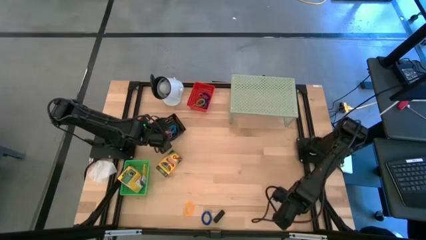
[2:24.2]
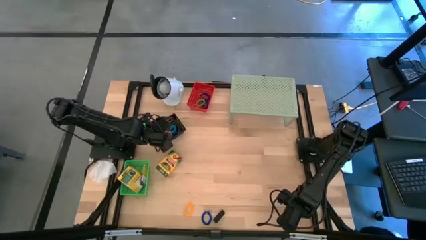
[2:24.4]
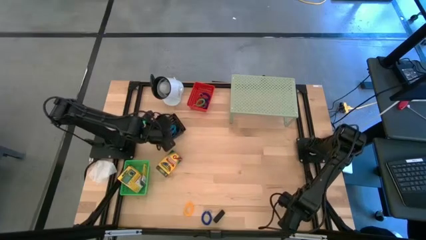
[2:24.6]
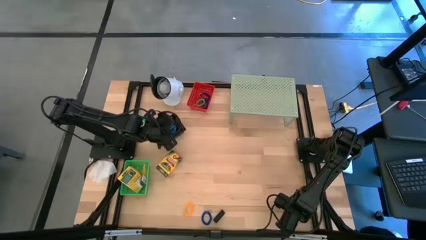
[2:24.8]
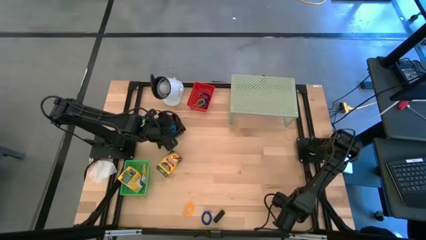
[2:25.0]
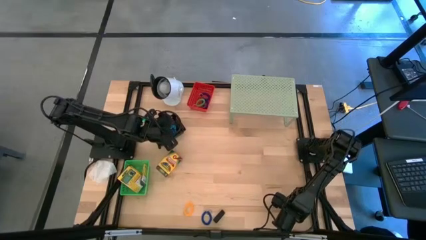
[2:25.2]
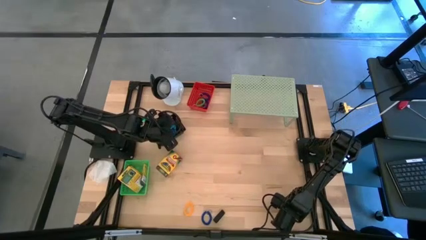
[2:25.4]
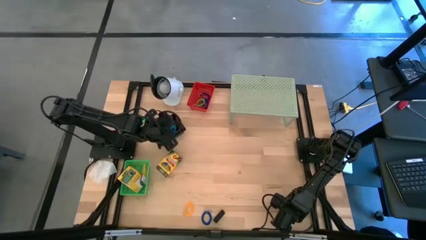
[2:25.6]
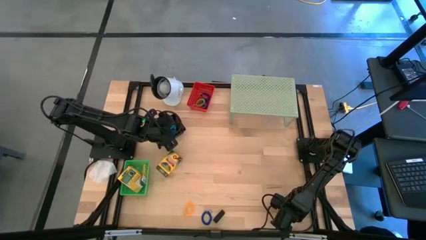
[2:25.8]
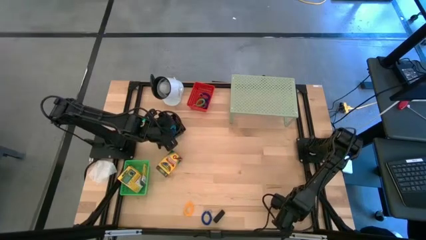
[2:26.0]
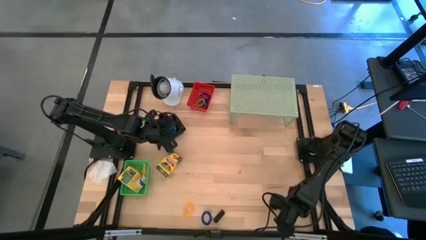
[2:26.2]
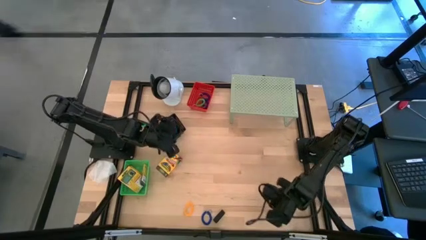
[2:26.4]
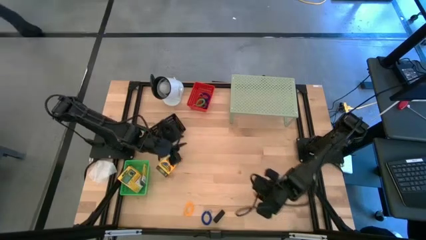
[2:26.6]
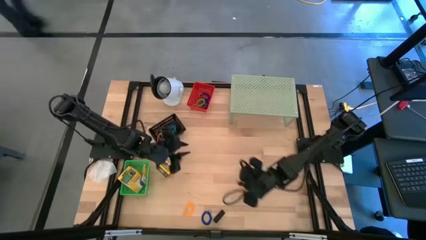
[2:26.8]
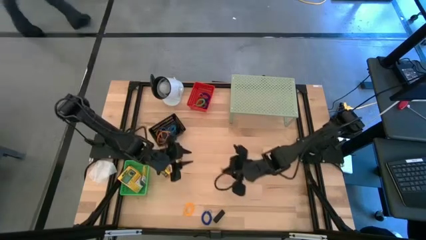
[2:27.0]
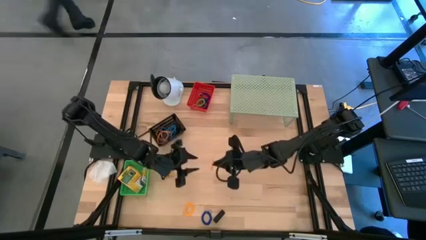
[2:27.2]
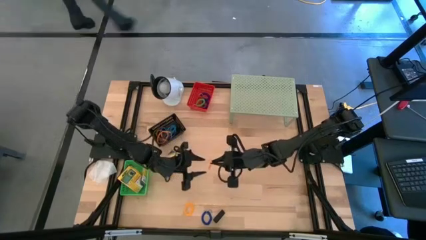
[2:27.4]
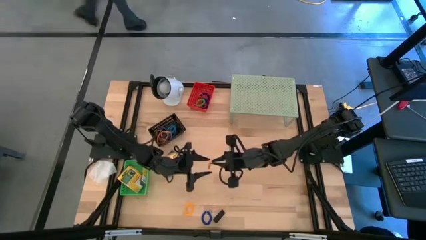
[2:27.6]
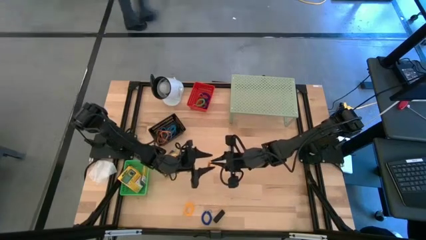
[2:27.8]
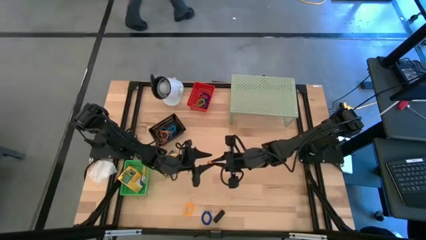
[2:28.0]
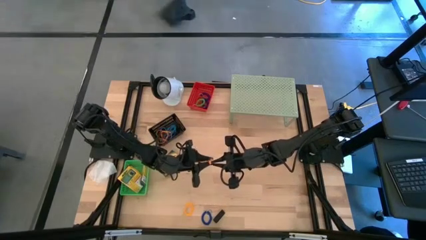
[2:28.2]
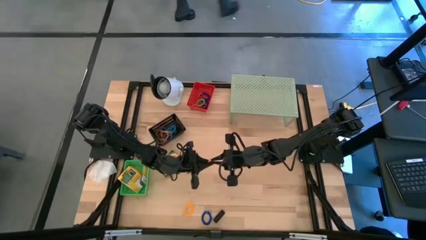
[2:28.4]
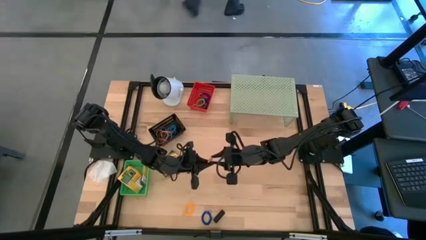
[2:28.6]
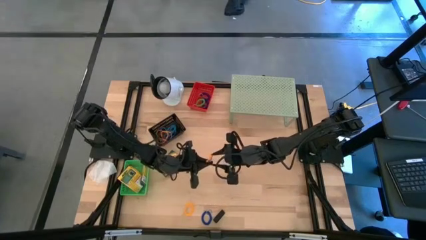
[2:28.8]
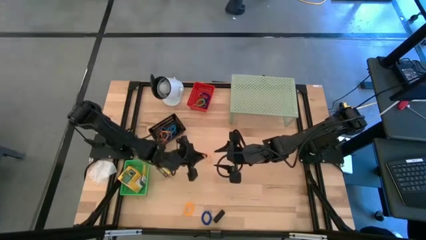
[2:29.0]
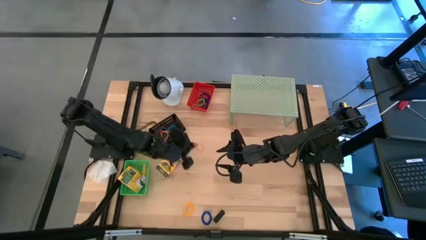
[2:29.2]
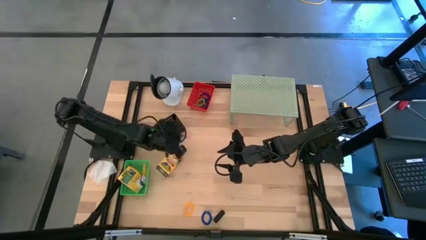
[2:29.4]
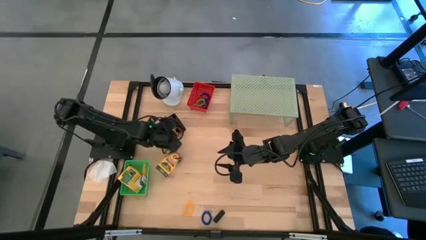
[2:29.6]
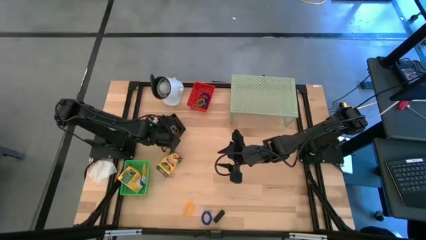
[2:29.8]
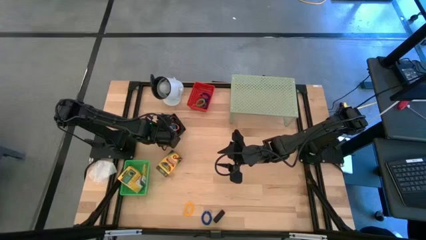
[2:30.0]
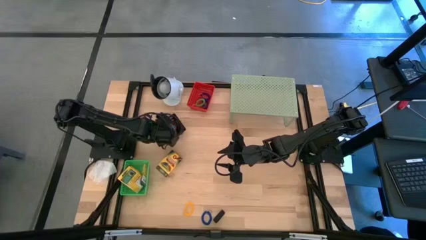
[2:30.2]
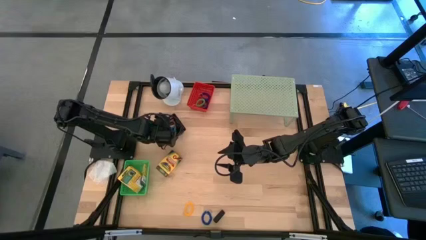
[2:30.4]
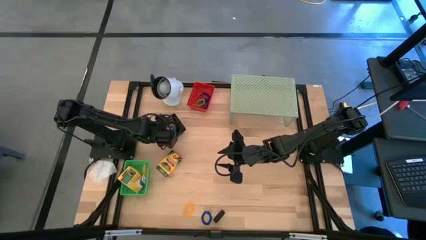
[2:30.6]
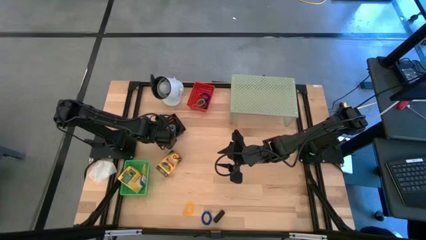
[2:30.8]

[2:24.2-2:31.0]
Task: Pick & Place Office Desk Supplies
Put the orange rubber band into the black bin

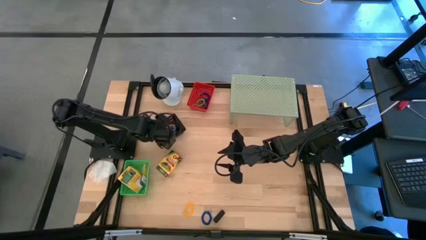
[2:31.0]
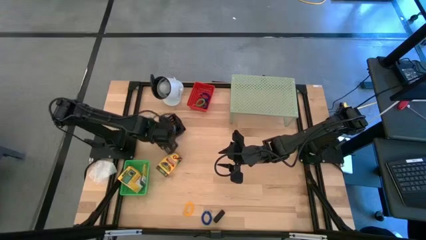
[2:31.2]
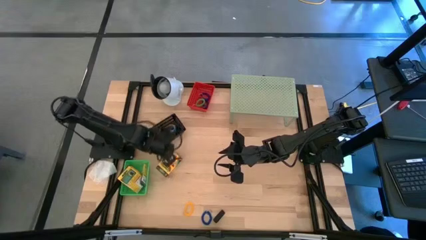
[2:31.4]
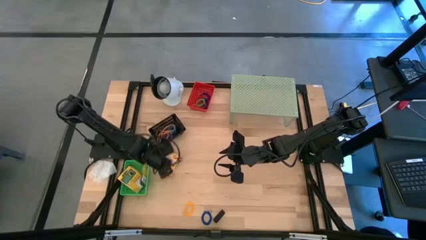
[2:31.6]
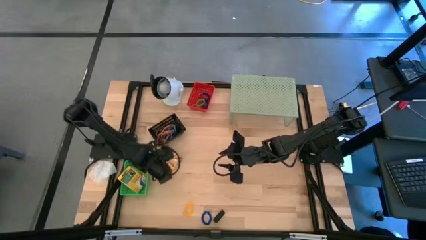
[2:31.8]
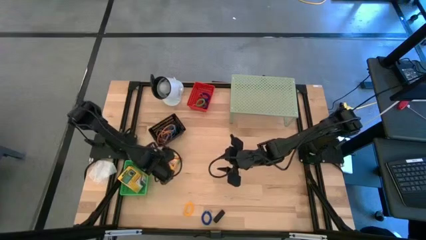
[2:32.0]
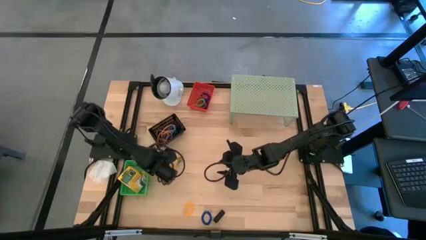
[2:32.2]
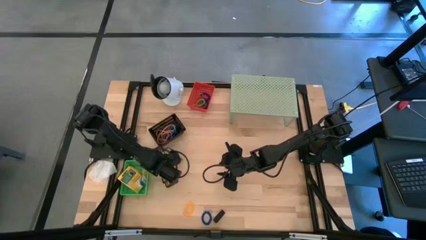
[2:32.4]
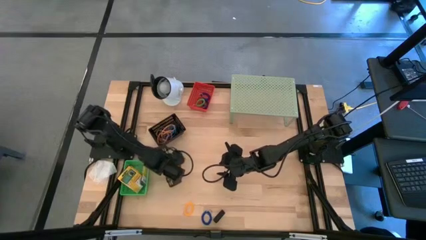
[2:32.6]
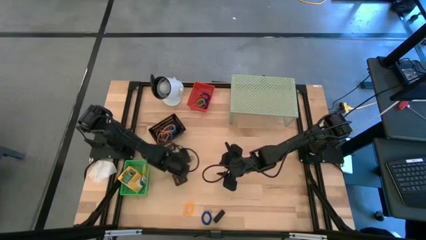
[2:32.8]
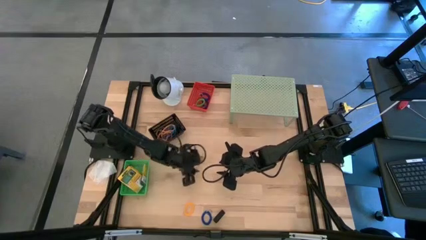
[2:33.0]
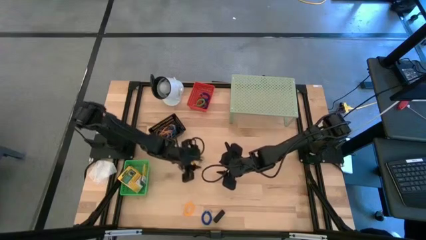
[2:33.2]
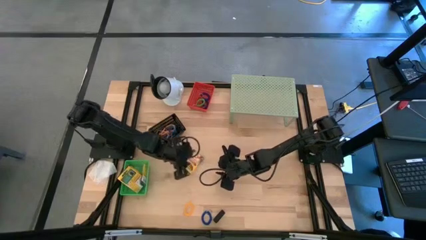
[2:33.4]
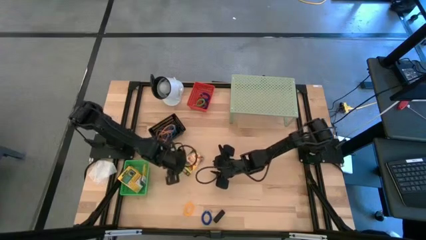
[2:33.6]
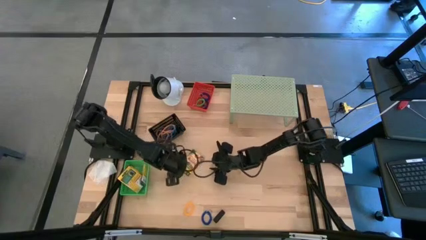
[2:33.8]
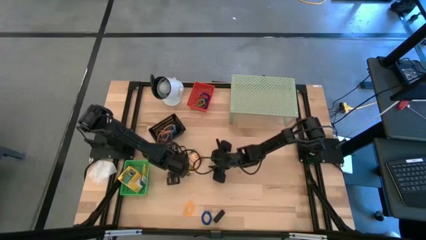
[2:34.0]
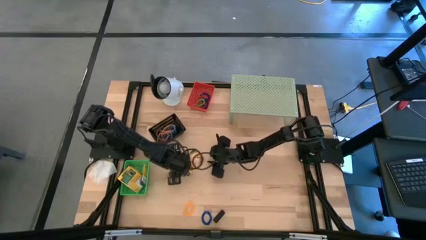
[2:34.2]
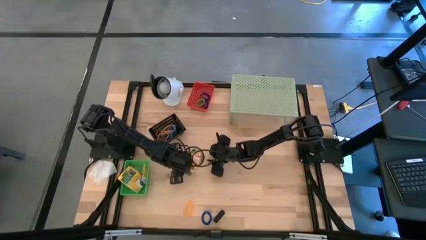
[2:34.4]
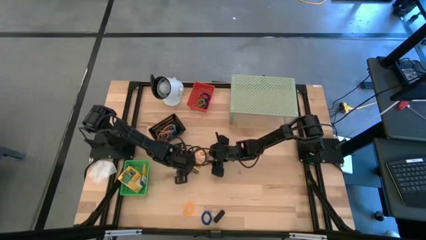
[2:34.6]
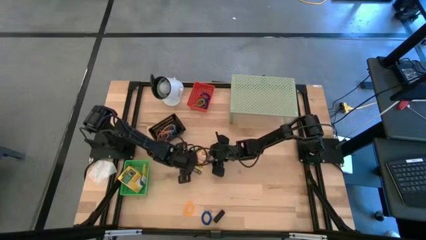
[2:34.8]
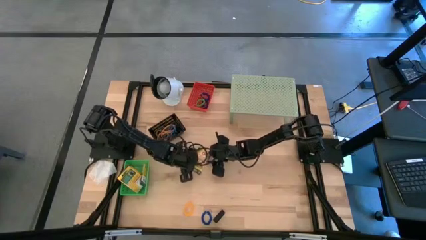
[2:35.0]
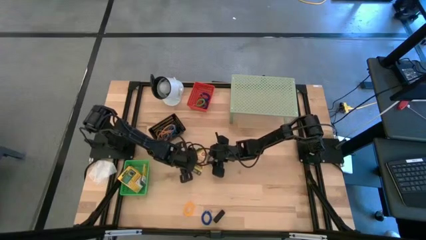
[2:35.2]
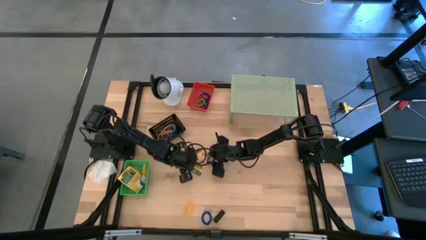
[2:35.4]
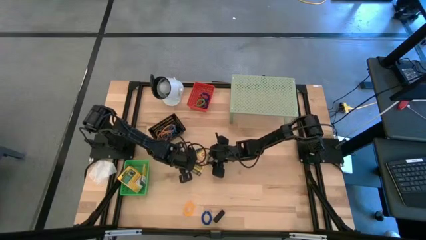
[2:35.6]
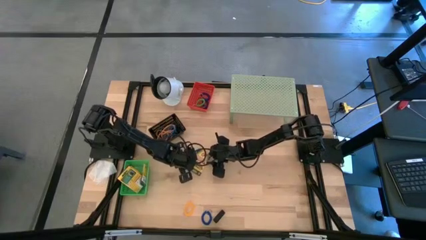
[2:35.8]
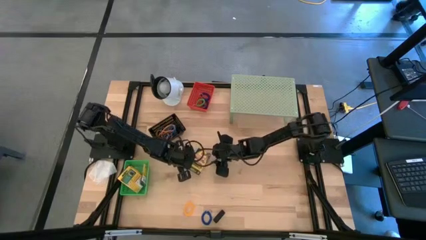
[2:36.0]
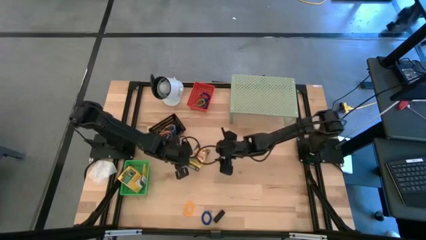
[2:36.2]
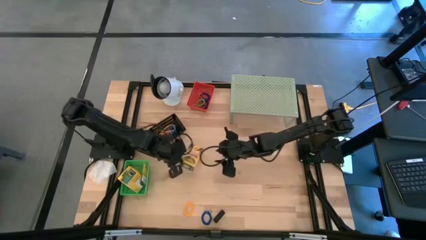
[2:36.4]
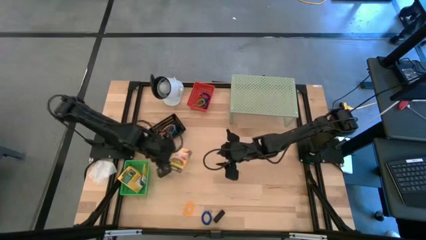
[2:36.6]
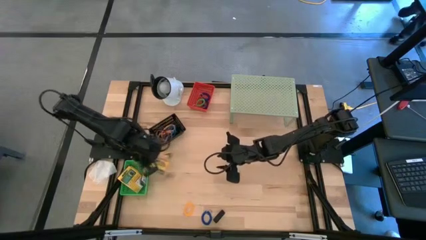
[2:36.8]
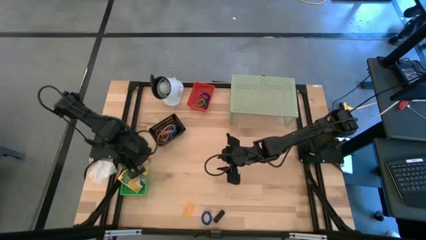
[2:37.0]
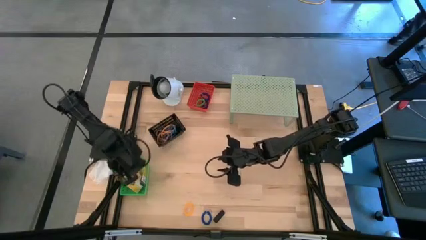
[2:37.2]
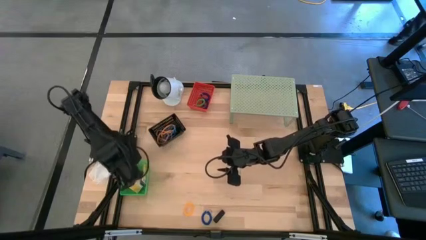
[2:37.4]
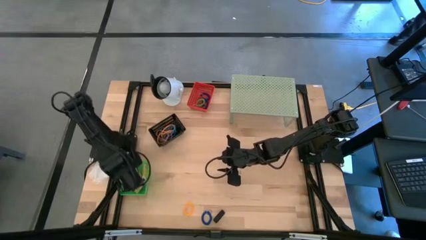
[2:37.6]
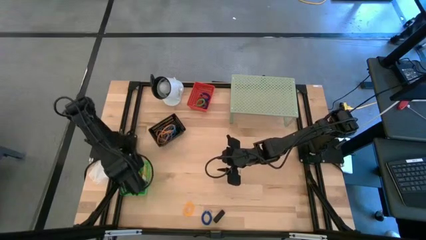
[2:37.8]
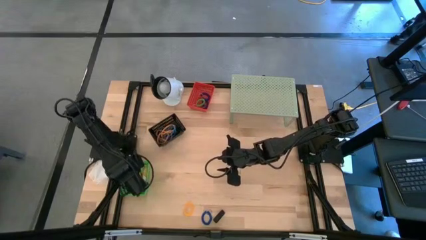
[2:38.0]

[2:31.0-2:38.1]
Put the crayons box into the green bin

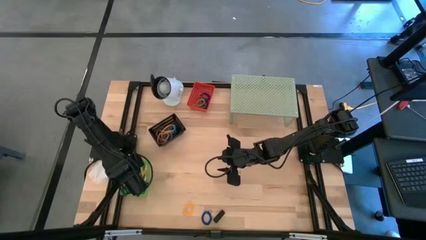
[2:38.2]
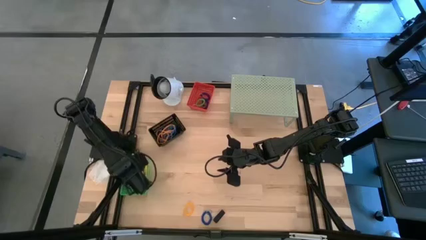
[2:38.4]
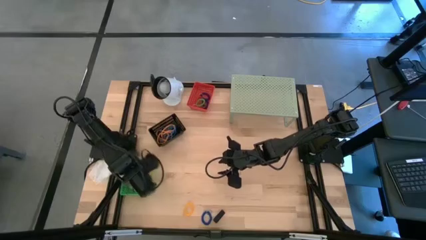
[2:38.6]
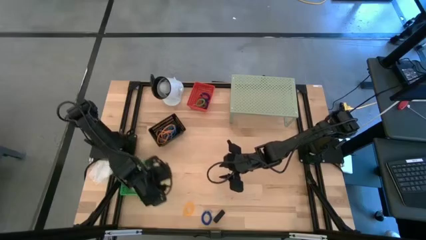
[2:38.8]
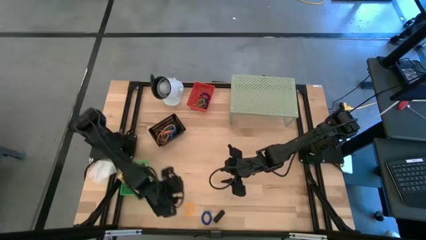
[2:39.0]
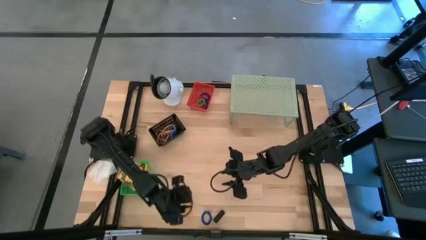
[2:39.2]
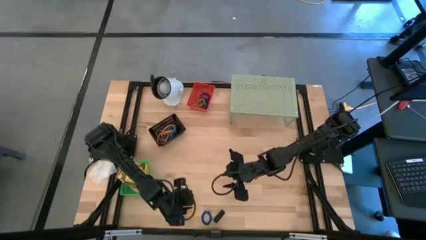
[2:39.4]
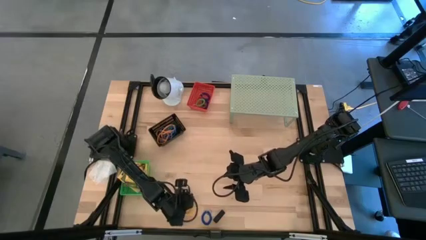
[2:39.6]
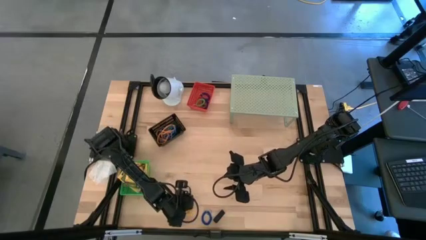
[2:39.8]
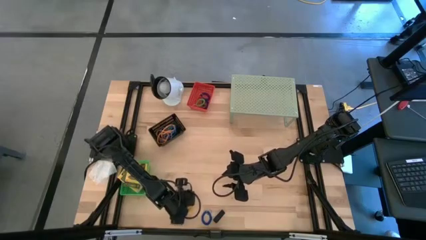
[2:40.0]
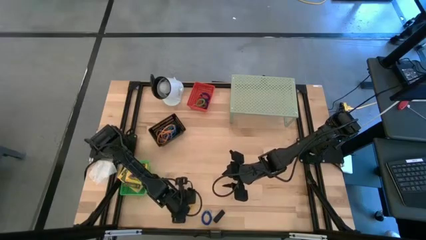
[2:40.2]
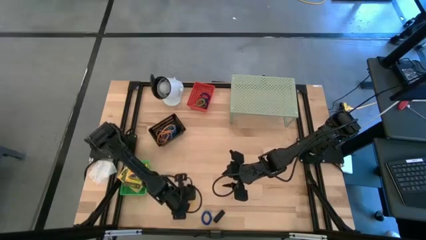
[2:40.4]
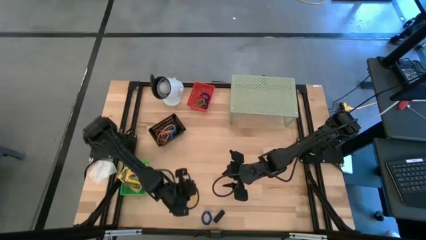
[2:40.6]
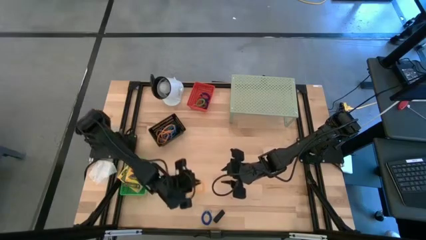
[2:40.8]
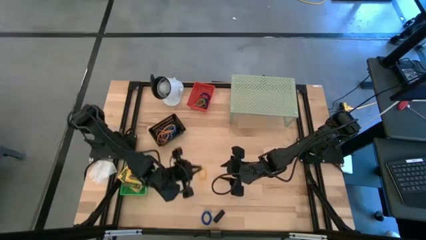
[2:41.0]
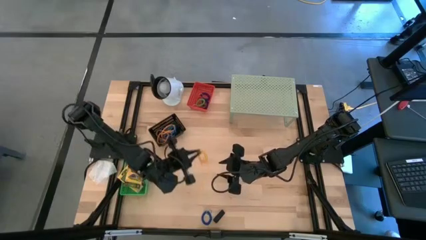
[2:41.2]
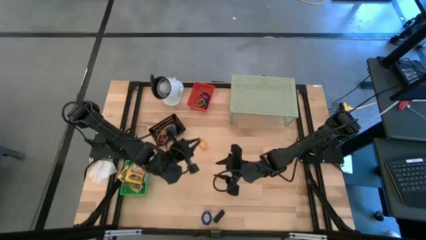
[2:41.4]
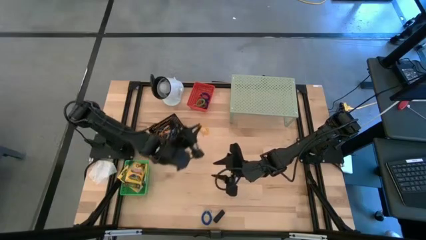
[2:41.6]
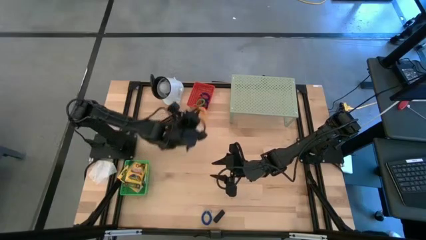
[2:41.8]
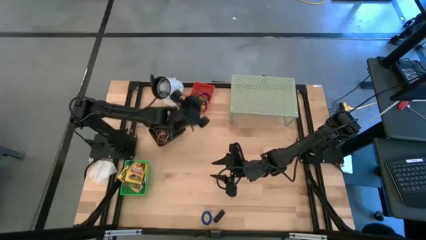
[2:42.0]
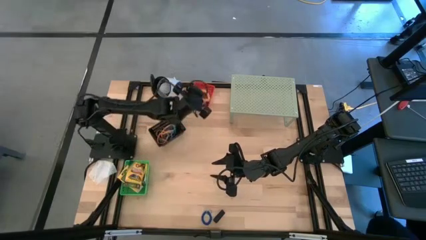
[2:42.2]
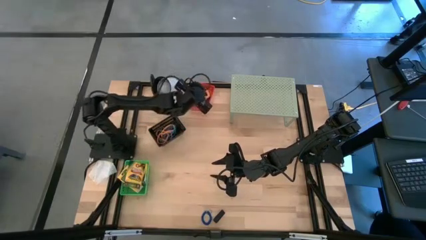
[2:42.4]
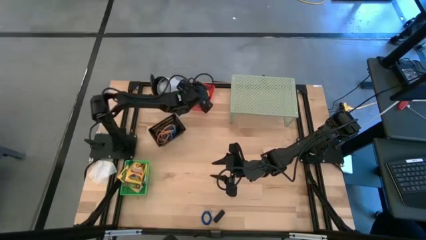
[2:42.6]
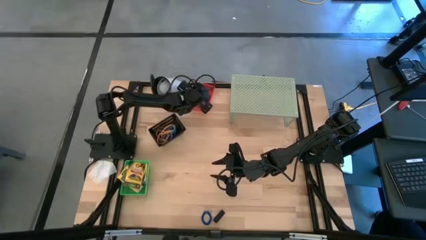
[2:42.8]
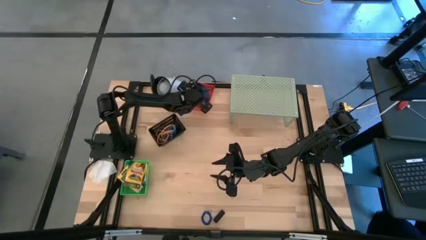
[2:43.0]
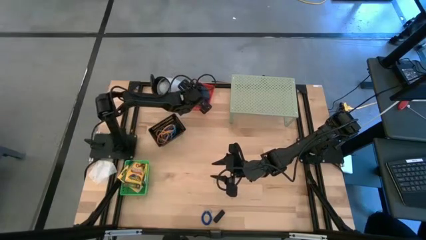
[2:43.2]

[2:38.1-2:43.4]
Put the yellow spring keychain into the red bin
